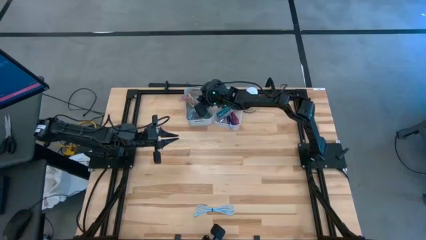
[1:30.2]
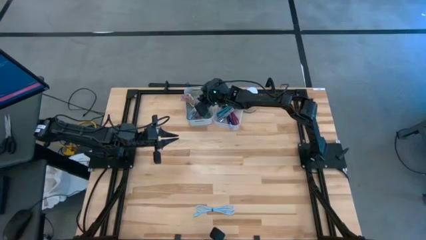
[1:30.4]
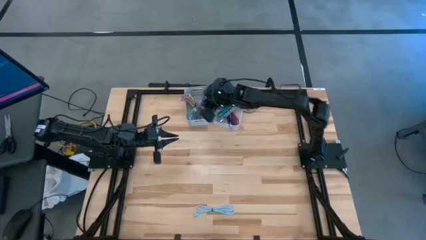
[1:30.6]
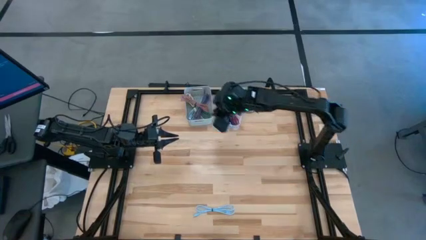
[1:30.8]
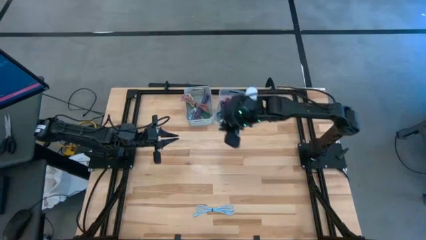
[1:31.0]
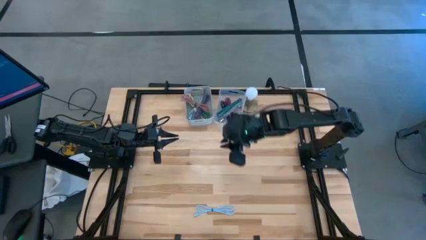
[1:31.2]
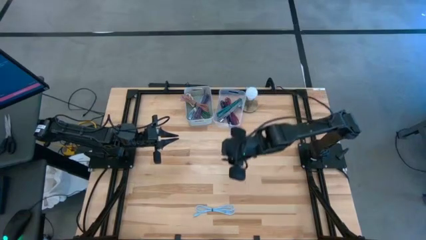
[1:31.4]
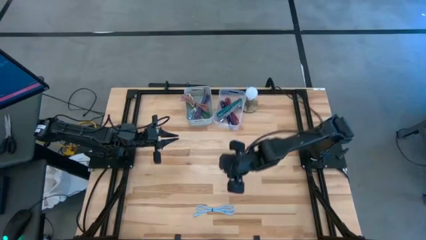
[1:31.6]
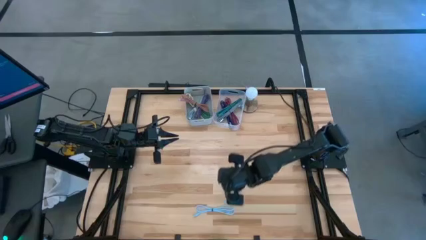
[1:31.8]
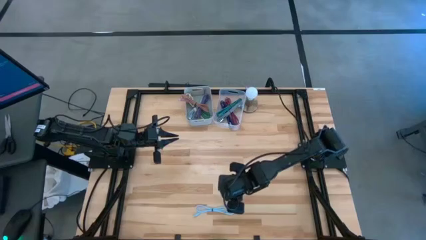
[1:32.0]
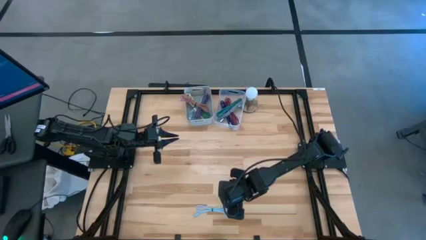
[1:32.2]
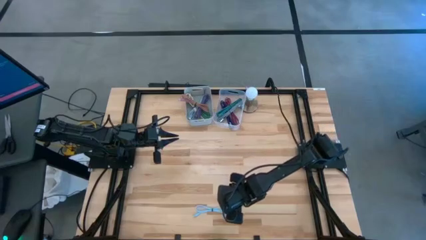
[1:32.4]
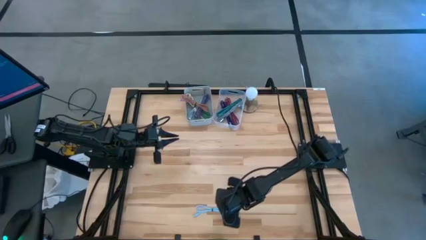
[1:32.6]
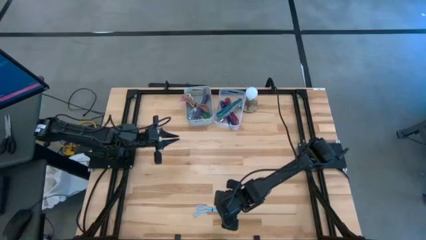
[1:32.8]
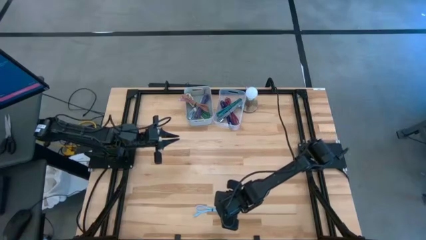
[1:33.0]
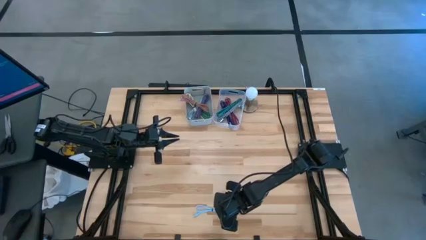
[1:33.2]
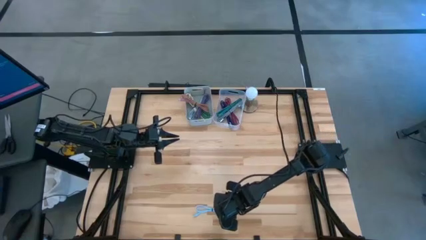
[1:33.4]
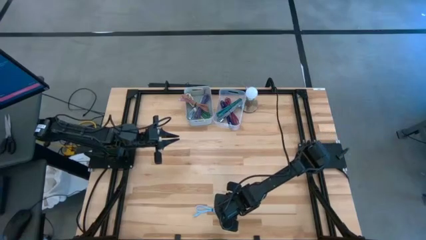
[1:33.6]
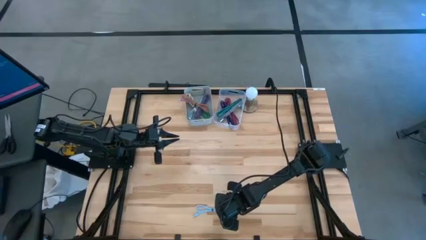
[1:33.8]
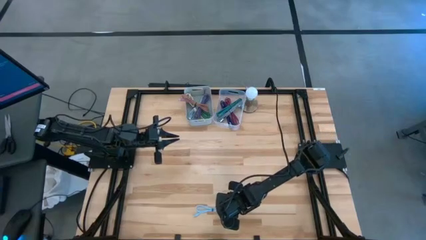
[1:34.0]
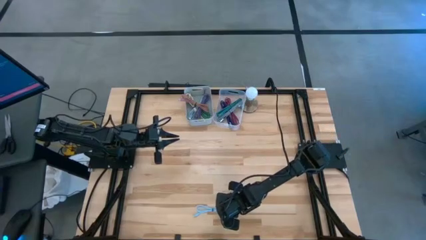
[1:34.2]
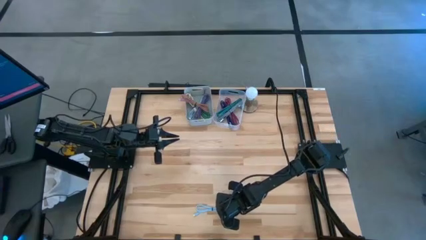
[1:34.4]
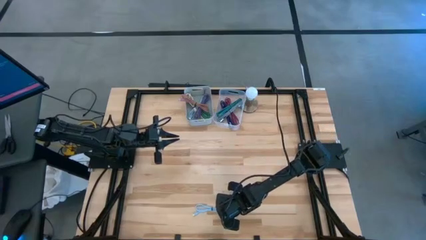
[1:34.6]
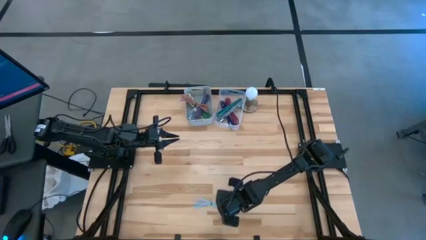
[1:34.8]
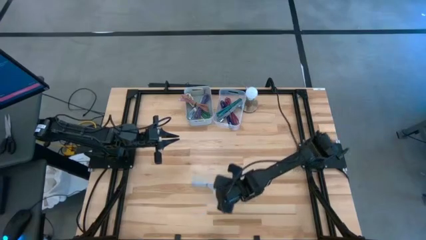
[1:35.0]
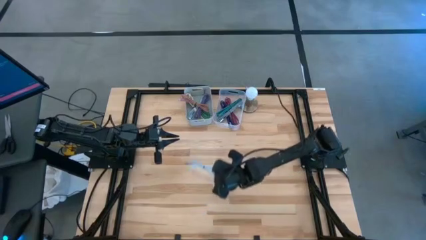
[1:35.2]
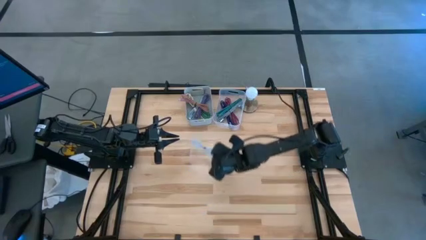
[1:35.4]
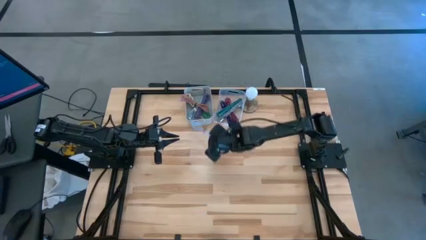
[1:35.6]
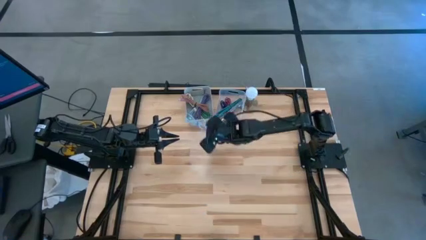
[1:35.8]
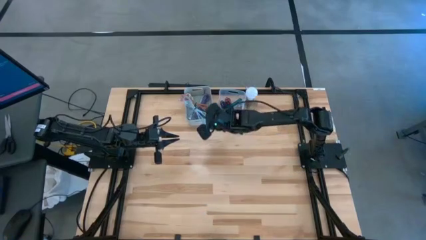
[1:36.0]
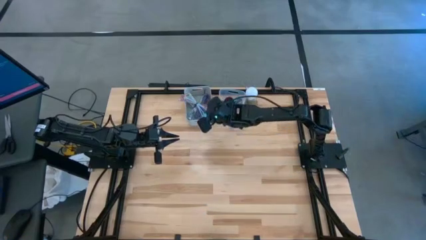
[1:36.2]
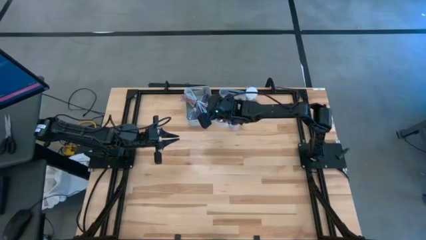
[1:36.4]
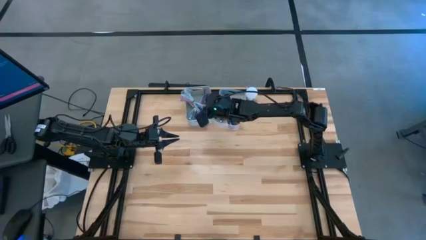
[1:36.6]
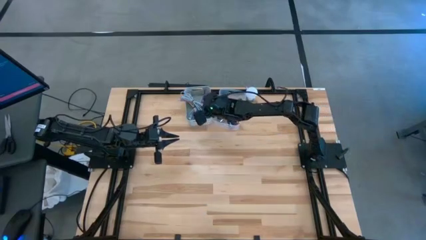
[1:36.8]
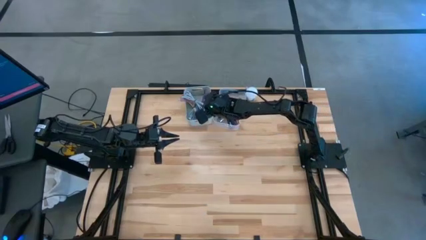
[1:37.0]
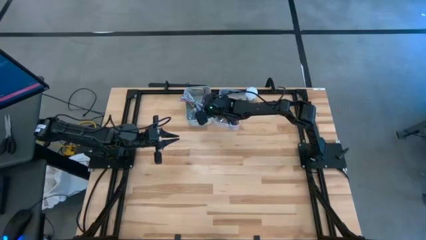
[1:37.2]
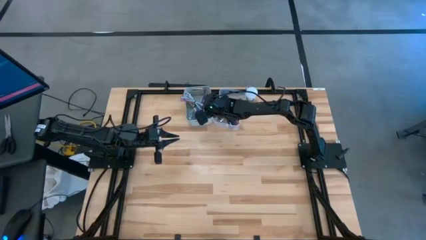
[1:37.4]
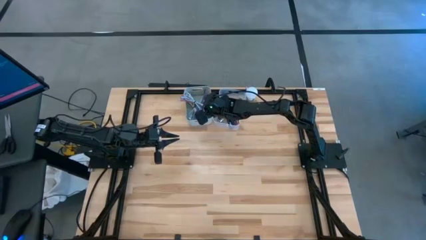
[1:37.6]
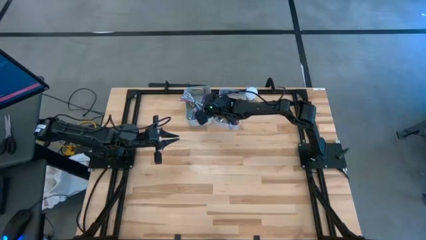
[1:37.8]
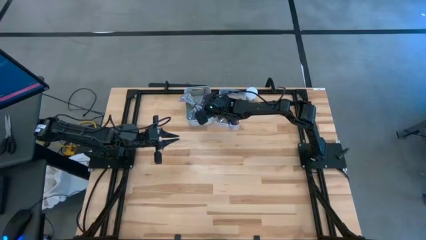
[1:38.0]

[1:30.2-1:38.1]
Task: Pick & Place USB Port
Put the blue charger cable into the white bin

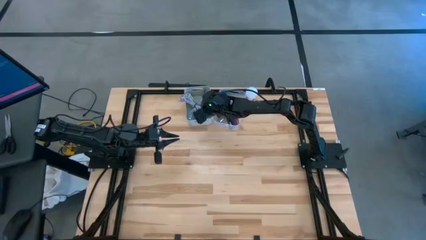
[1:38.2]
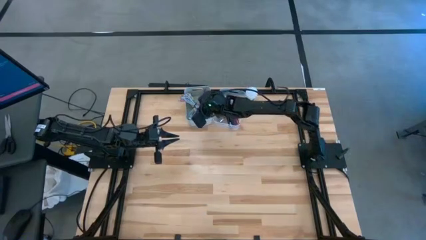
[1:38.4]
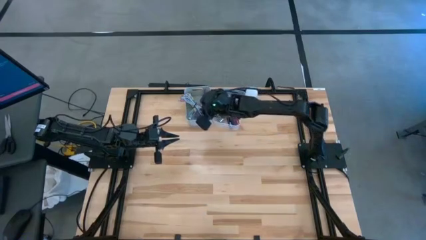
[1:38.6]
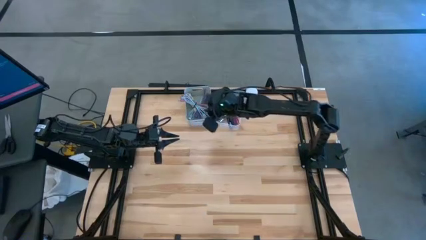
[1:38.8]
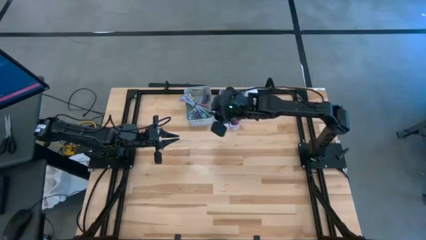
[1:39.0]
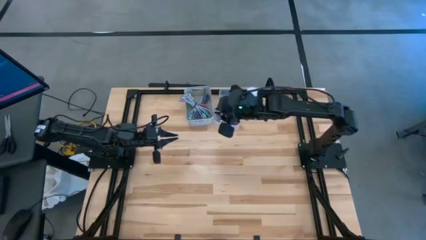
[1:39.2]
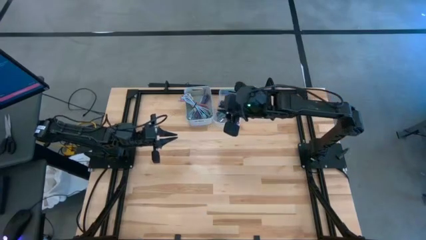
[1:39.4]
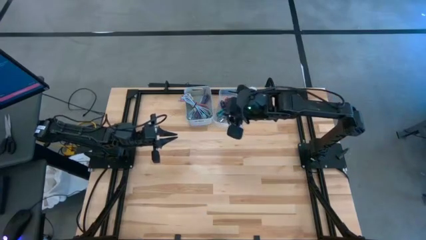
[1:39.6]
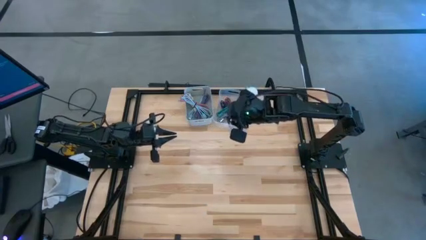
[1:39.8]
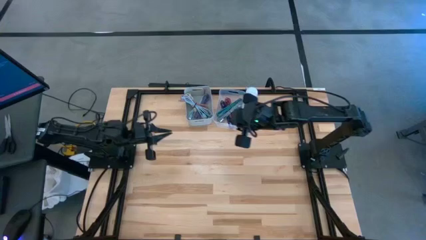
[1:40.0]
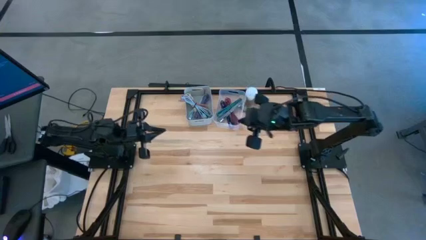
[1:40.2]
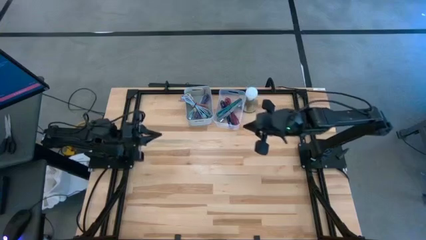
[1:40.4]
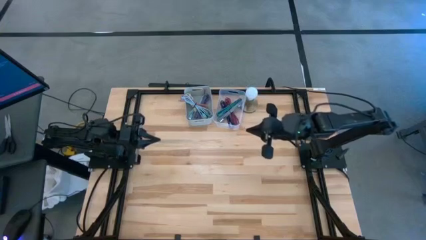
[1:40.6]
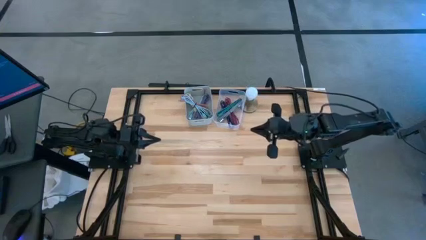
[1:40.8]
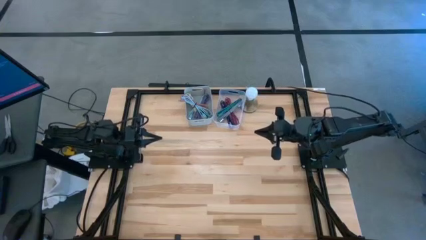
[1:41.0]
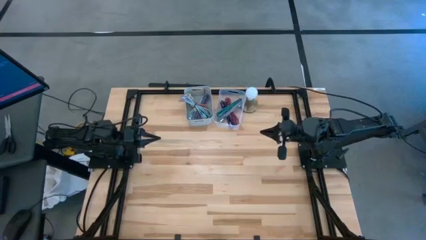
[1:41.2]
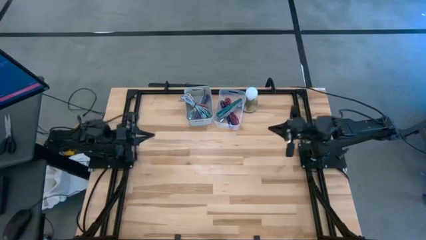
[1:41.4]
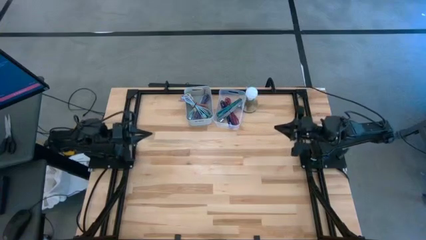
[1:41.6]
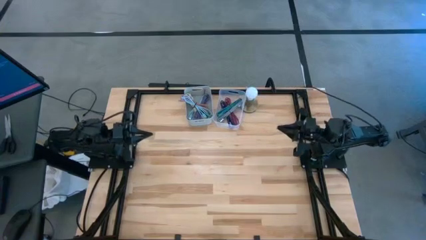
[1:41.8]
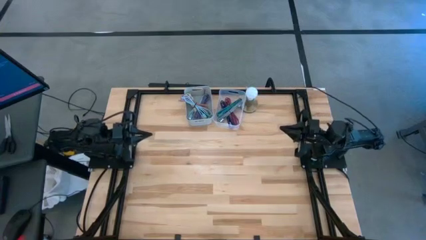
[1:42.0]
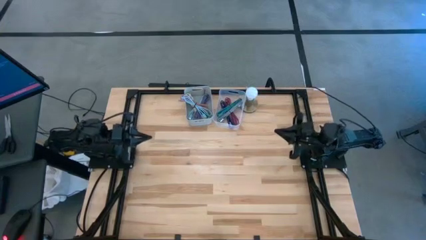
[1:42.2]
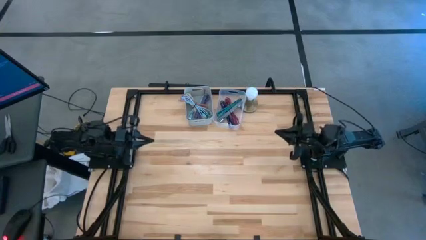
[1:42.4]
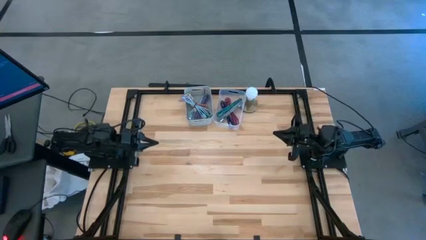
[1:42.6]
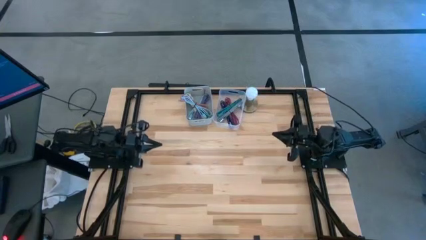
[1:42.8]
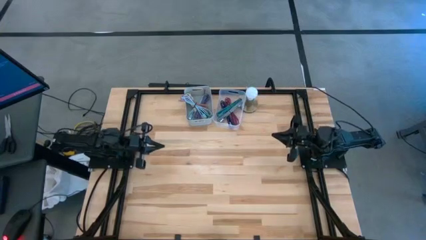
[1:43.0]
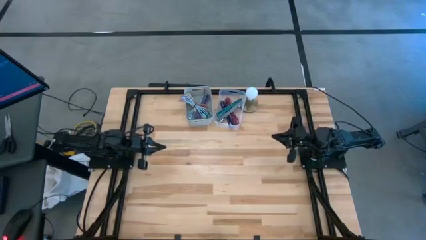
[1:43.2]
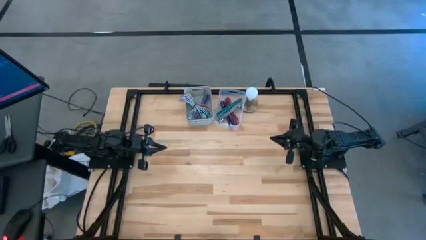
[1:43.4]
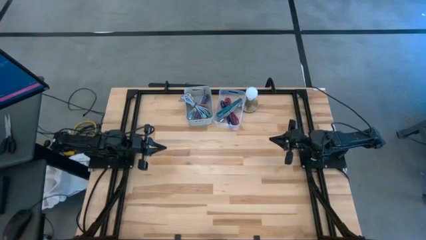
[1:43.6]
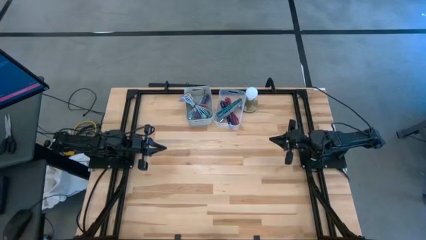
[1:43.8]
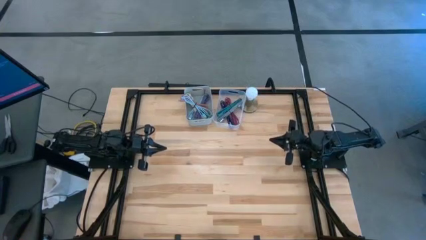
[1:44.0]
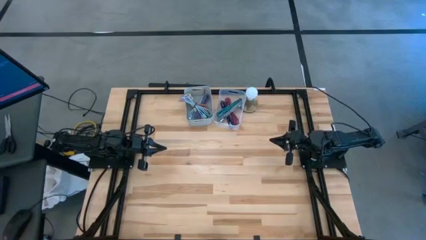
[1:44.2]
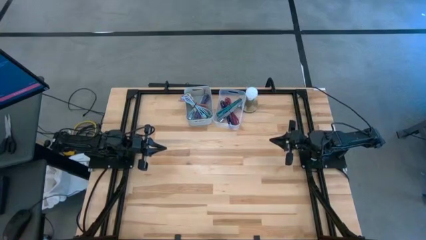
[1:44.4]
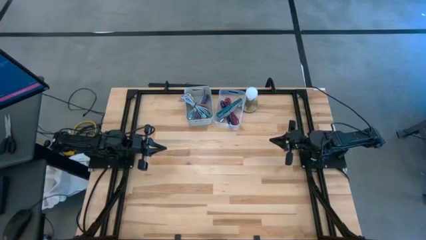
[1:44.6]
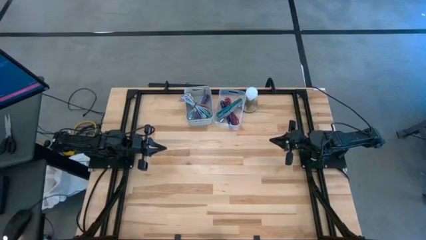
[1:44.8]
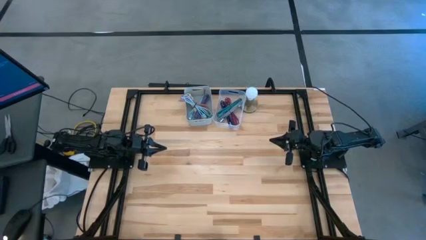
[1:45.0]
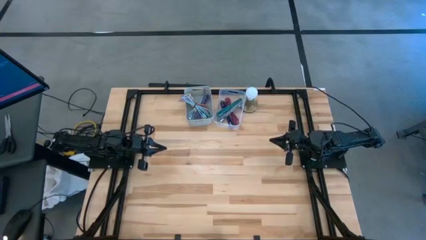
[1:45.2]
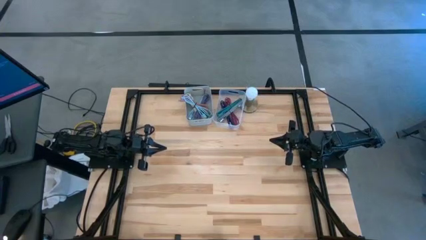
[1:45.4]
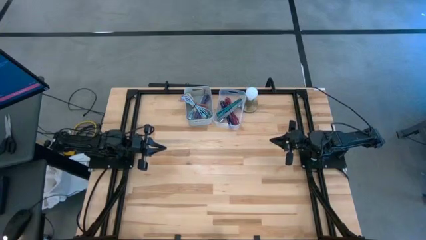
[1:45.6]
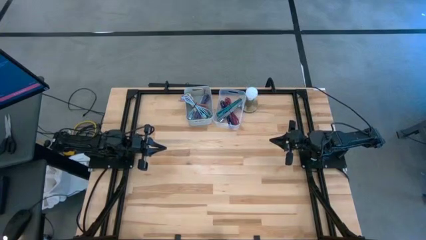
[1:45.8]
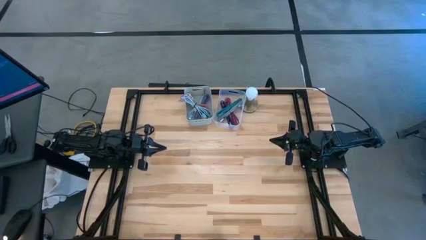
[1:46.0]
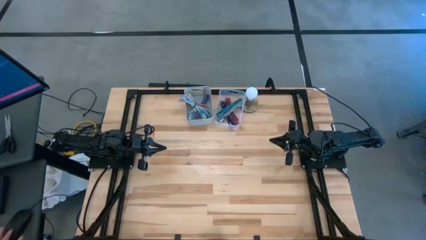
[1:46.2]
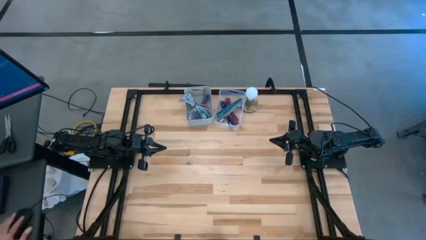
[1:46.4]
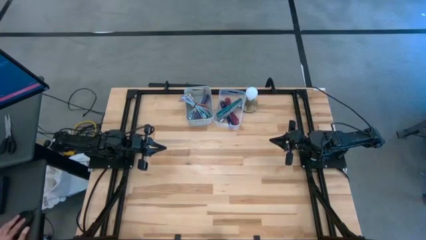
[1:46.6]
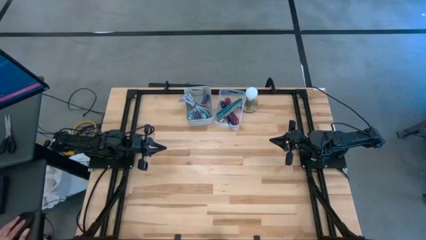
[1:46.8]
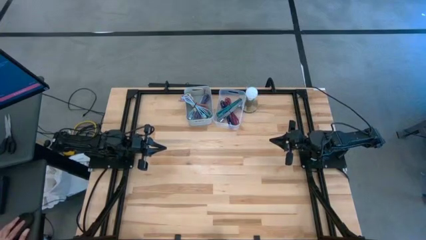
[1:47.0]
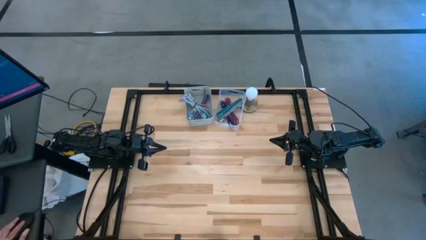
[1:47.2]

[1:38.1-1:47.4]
Return To Home Position
